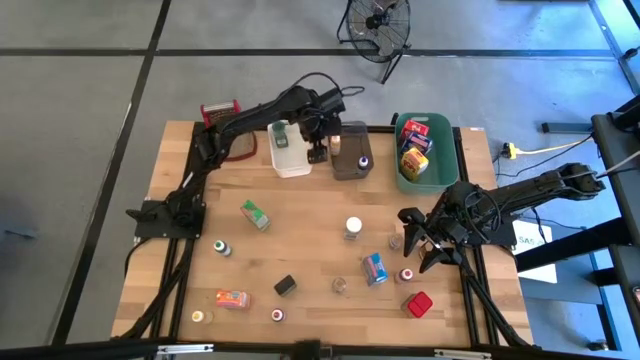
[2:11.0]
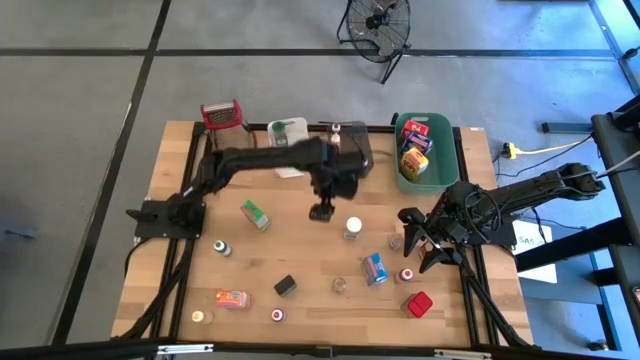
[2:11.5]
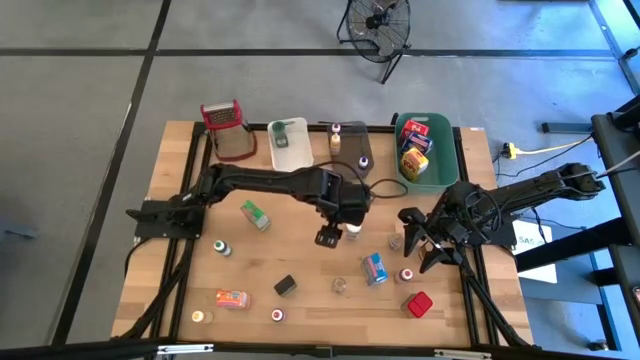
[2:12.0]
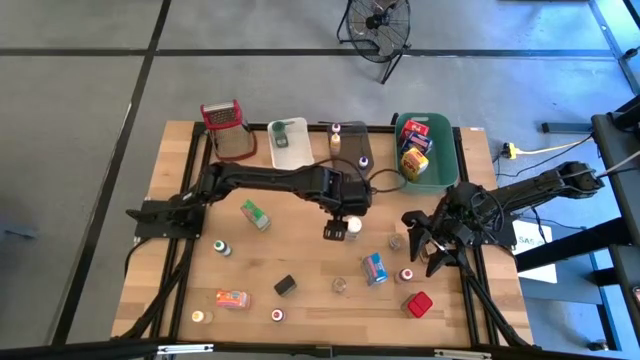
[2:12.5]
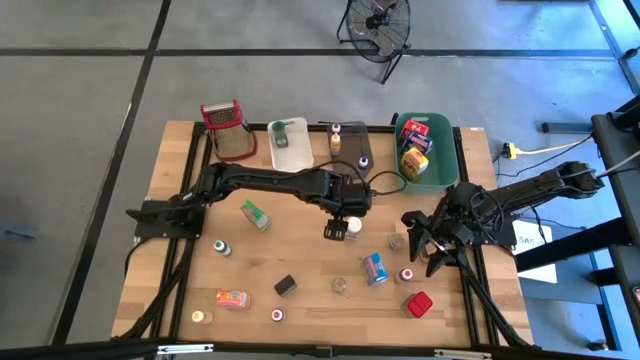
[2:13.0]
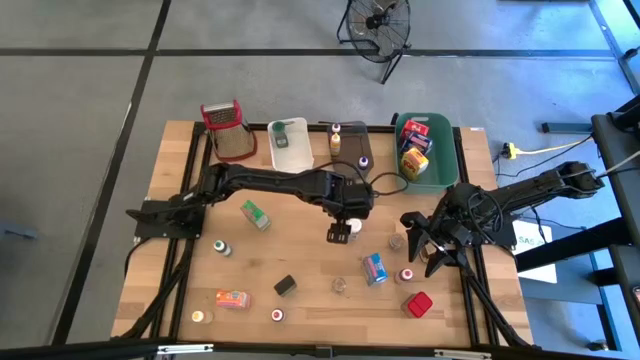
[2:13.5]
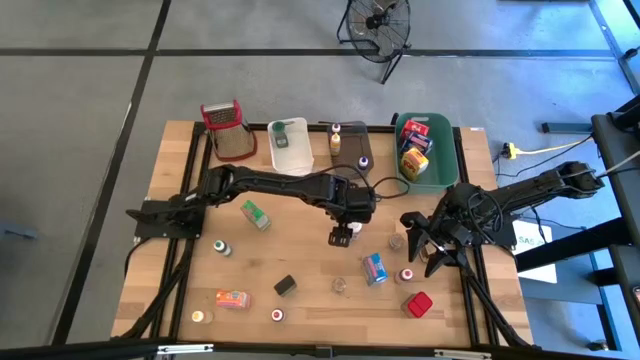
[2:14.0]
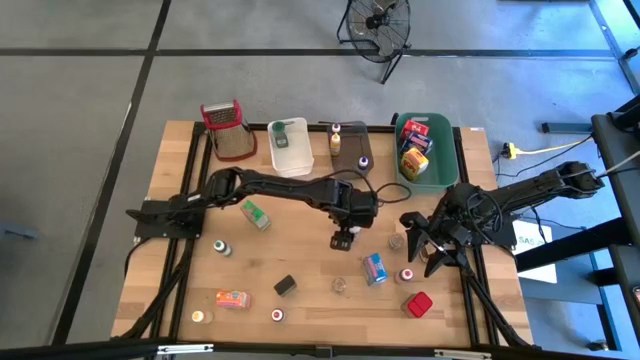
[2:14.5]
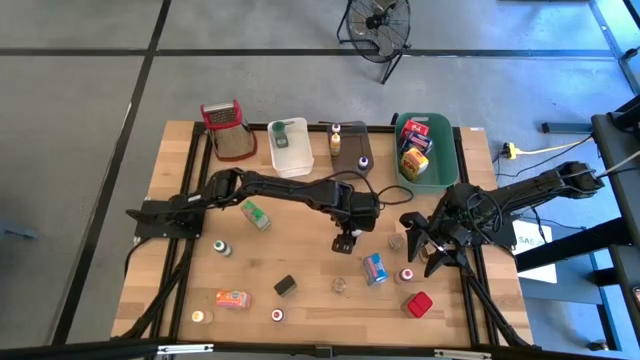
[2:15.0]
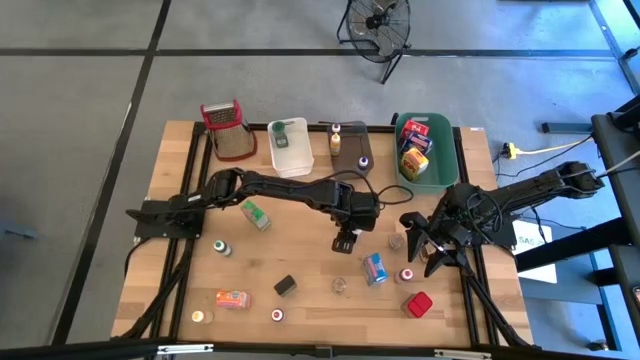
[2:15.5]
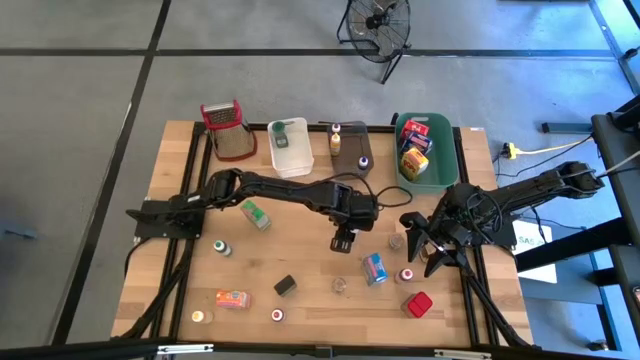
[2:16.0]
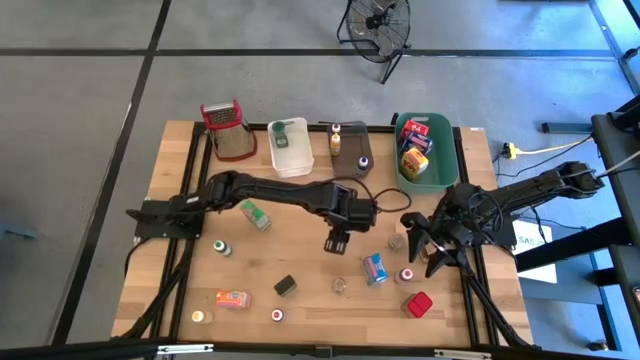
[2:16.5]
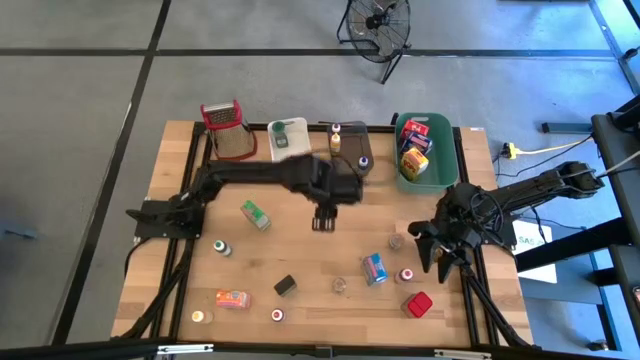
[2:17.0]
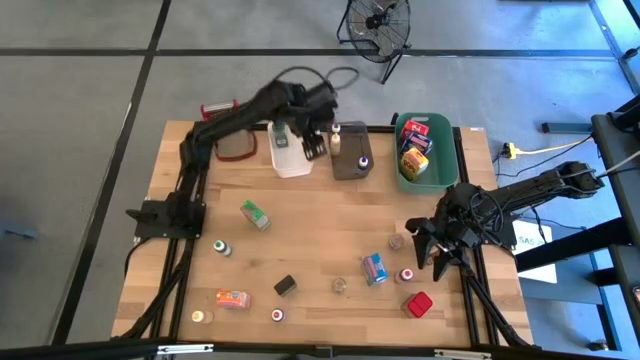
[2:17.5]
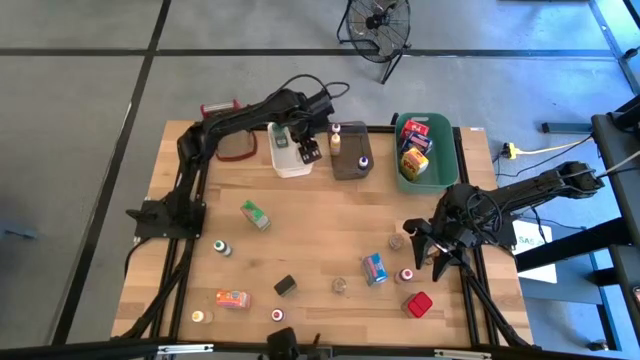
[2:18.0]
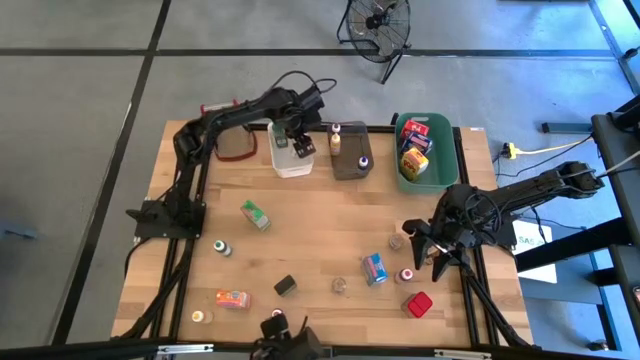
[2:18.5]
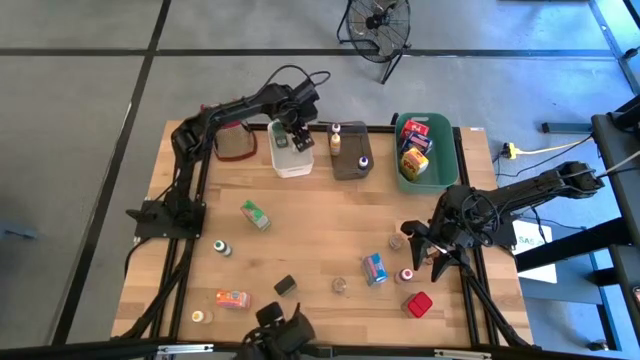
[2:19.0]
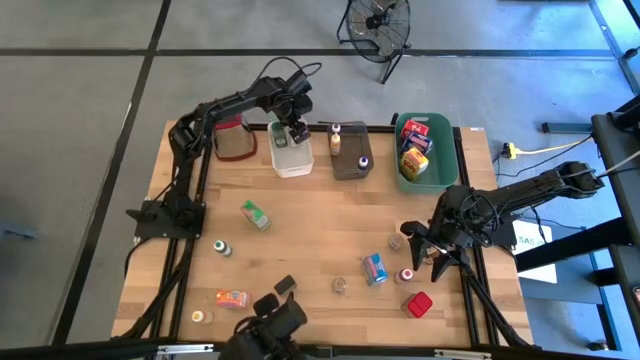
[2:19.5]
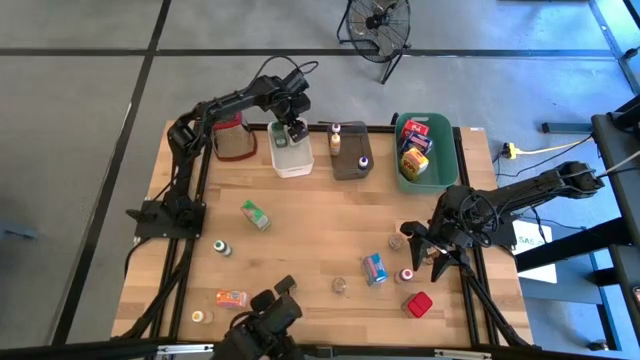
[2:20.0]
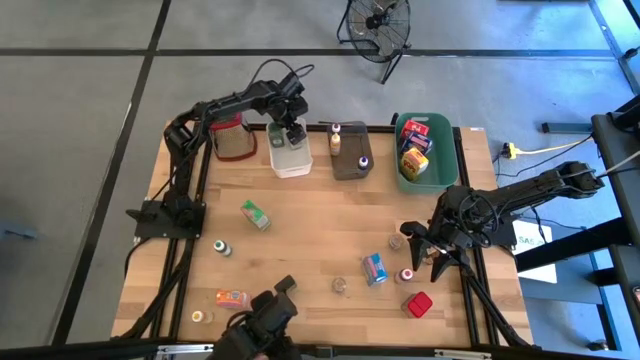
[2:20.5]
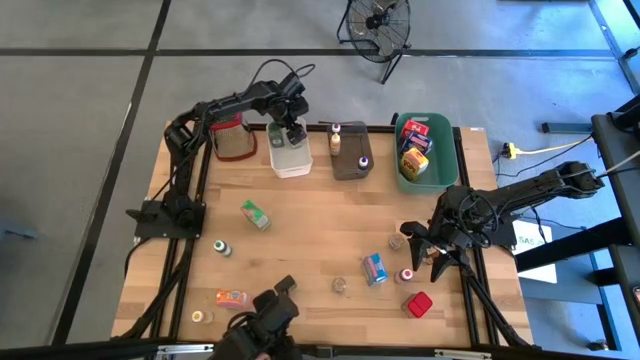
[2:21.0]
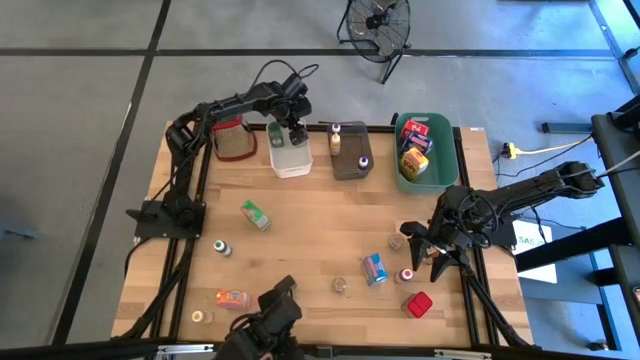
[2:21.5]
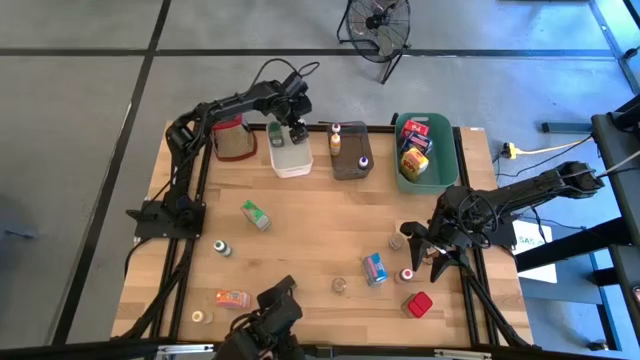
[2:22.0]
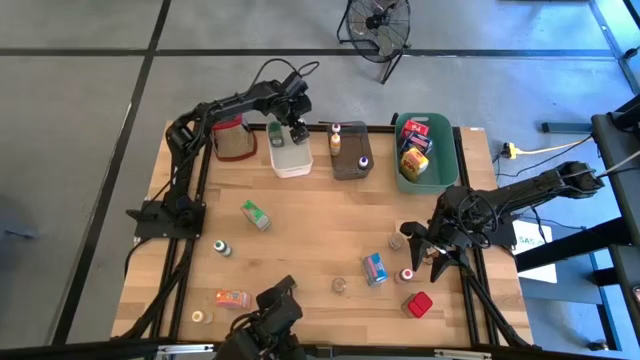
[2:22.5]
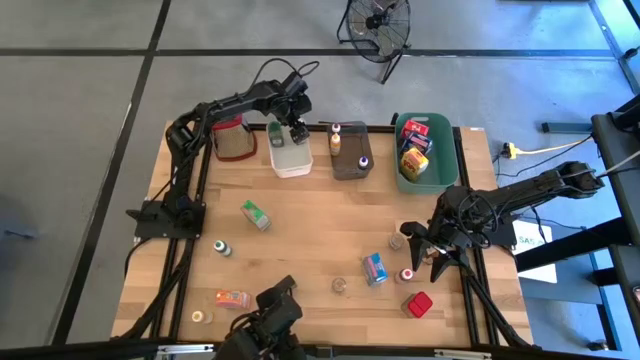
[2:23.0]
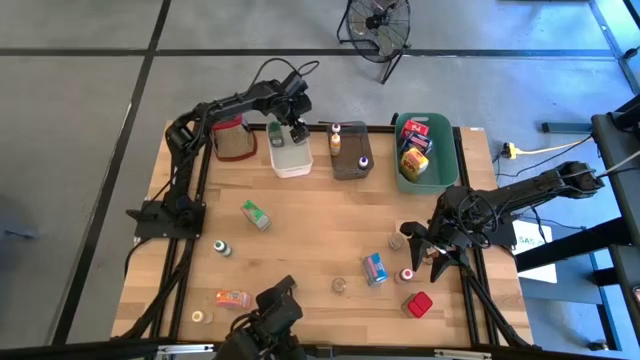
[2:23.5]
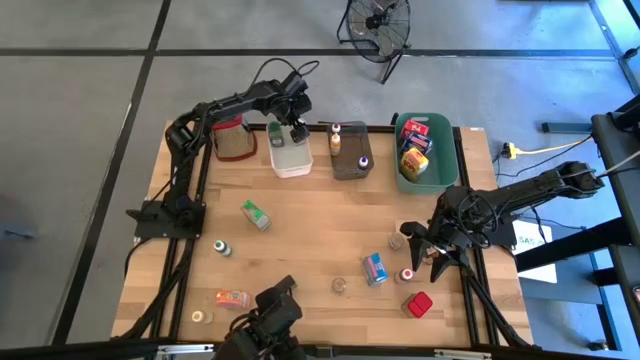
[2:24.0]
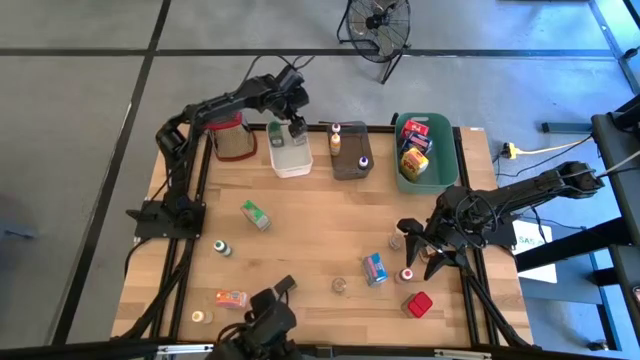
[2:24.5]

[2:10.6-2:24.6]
Task: Pick & Place Kitchen Items
Put the white seasoning bottle into the white bin

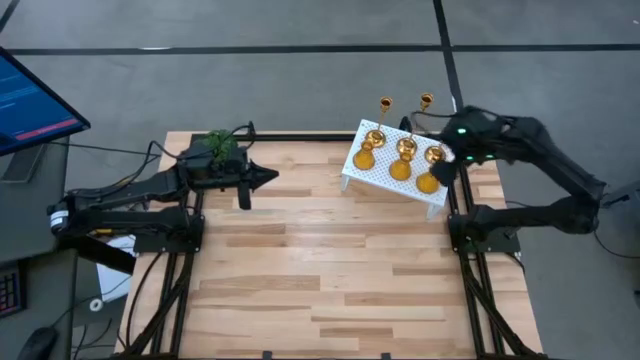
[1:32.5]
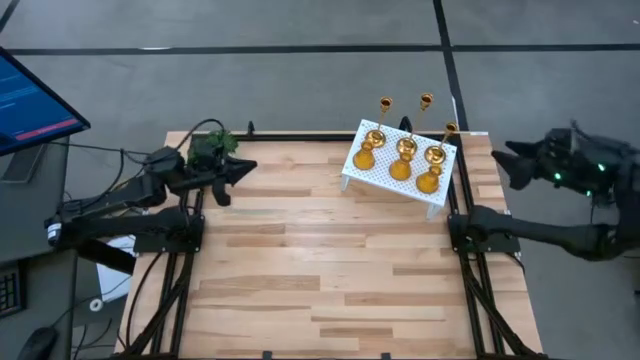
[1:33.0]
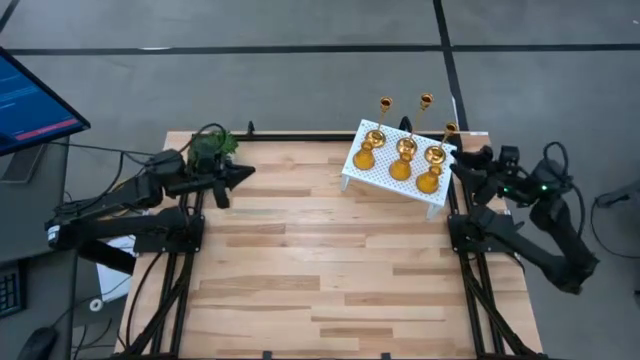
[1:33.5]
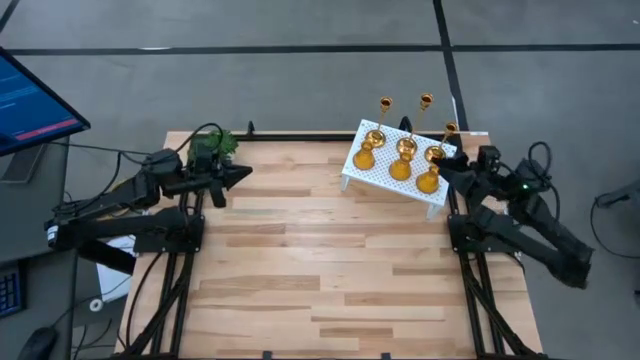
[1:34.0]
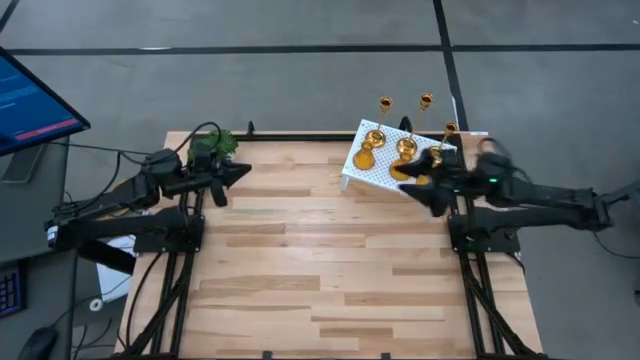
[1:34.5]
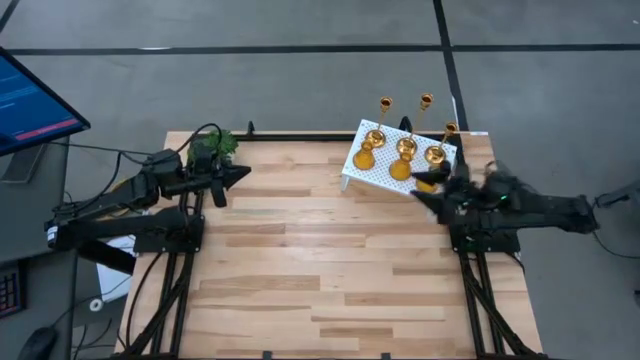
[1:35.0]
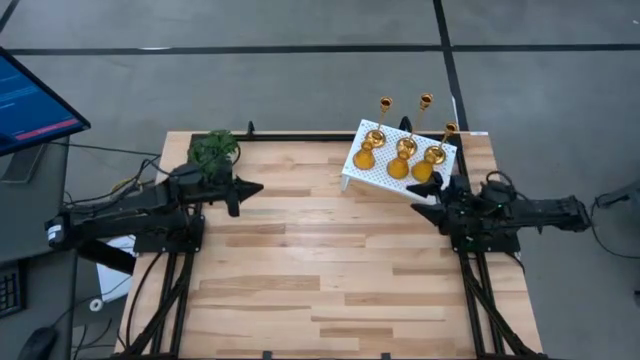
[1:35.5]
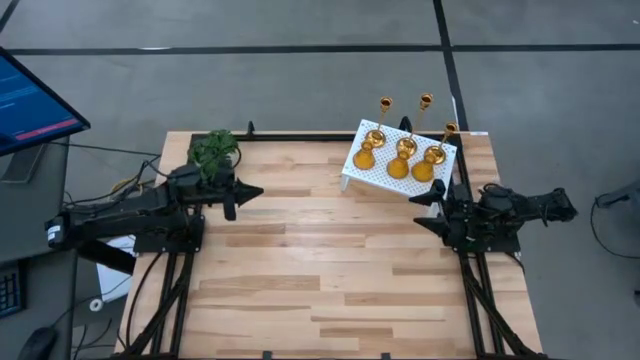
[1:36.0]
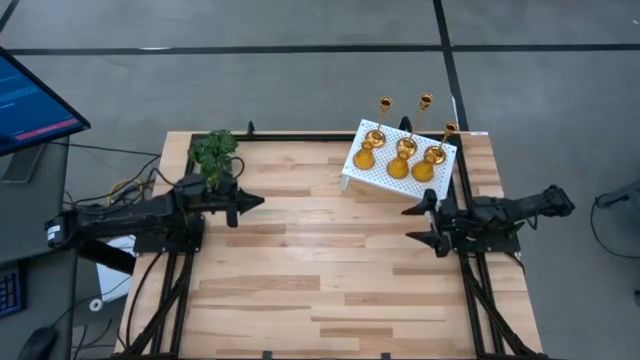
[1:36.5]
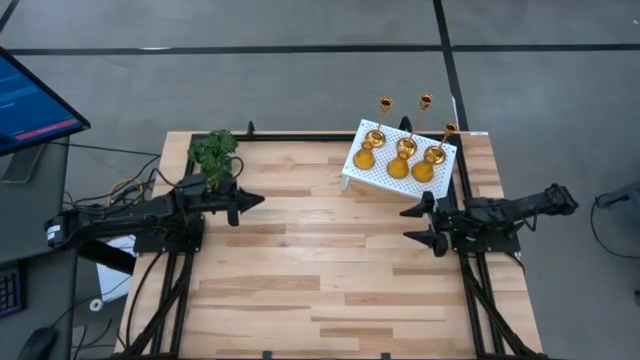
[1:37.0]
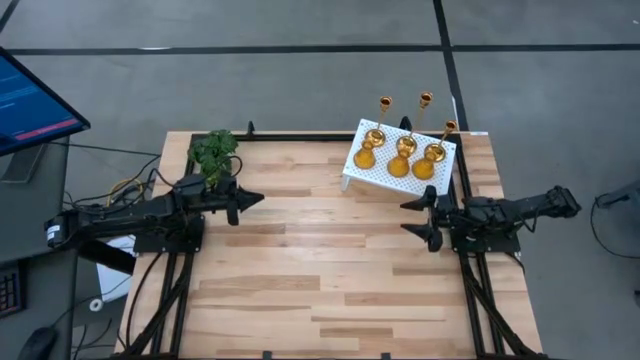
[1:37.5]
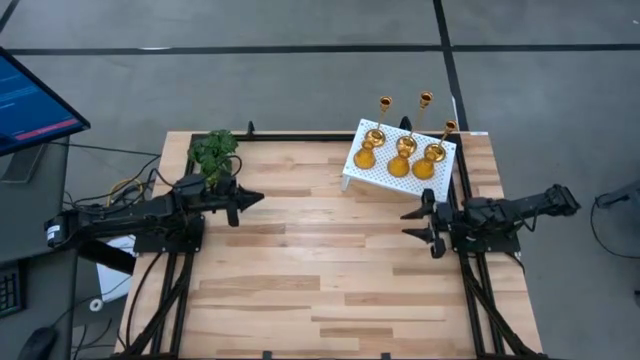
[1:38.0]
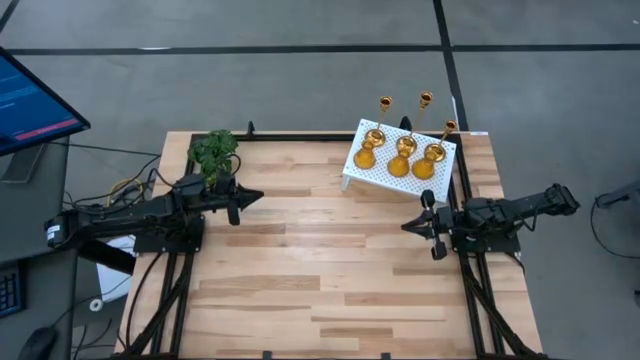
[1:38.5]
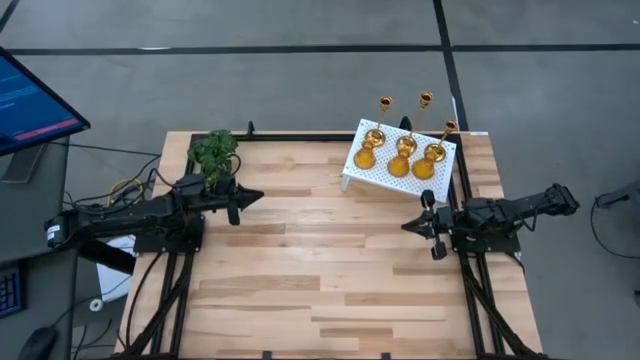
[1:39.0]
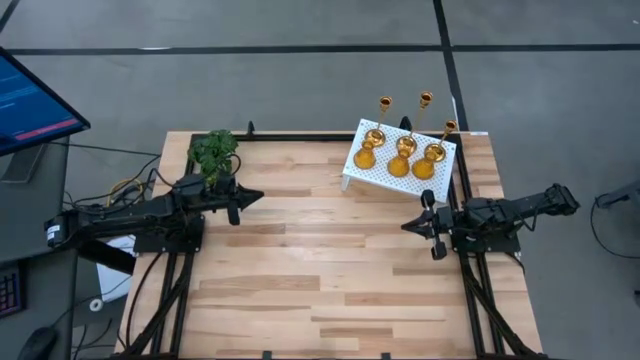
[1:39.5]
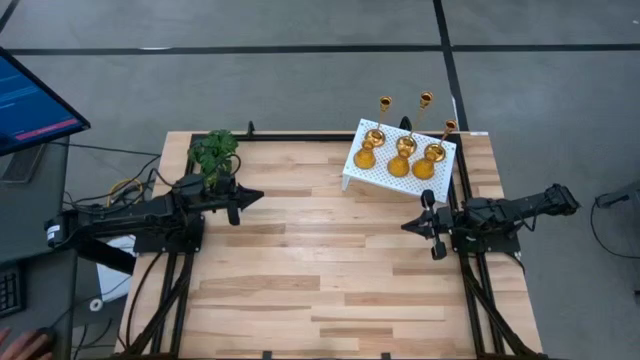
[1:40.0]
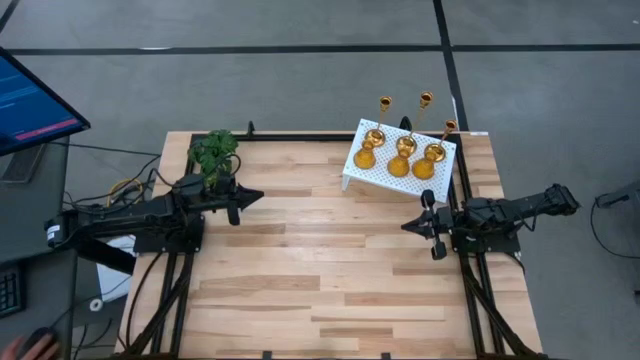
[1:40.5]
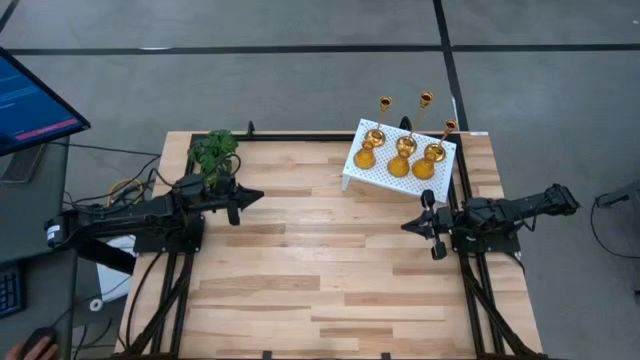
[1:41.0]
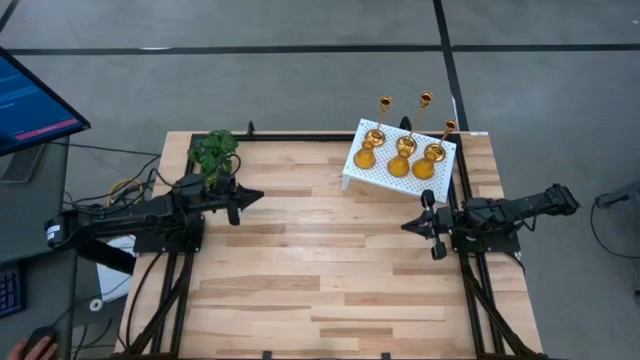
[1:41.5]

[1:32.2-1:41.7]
Task: Pick & Place candle stick holders
Return to Home Position
